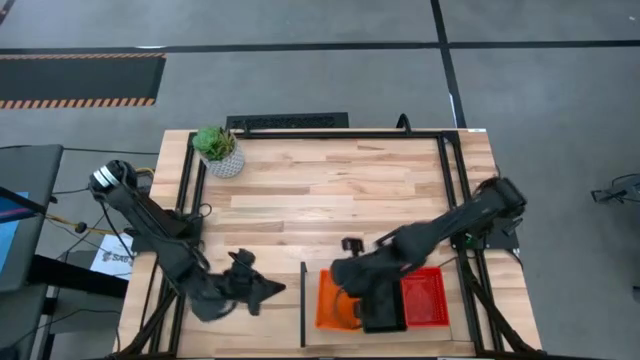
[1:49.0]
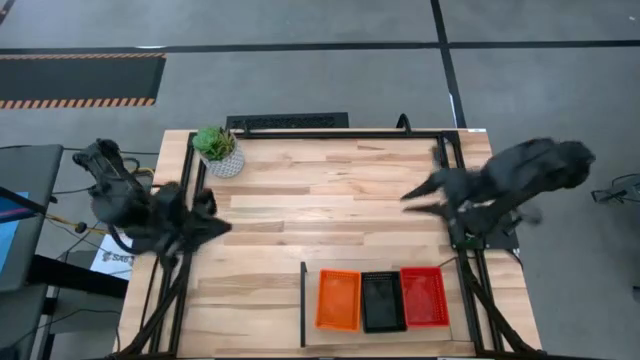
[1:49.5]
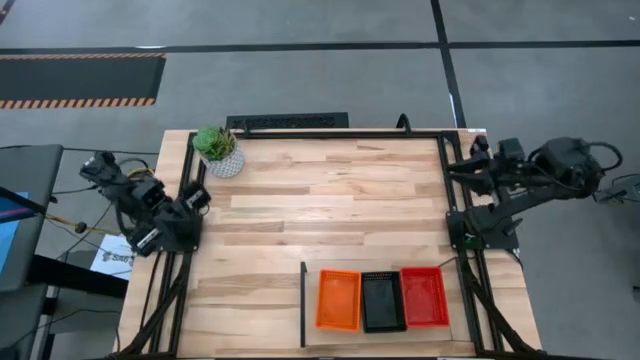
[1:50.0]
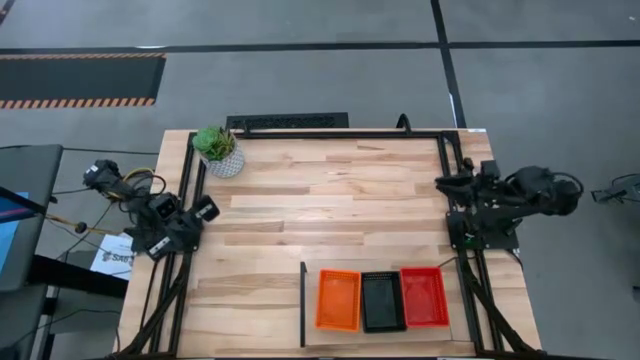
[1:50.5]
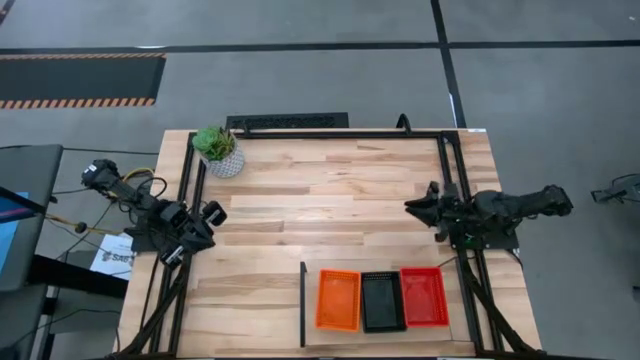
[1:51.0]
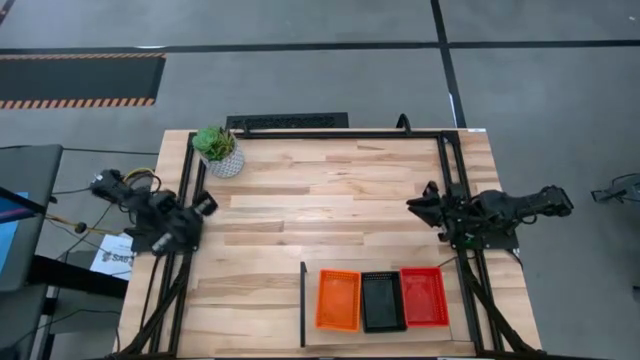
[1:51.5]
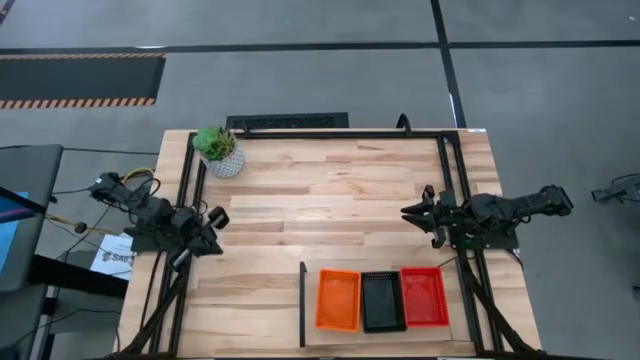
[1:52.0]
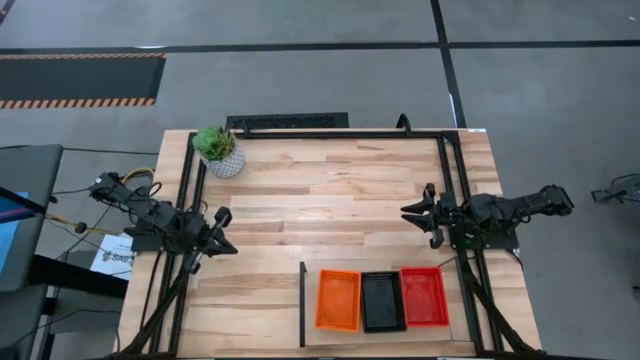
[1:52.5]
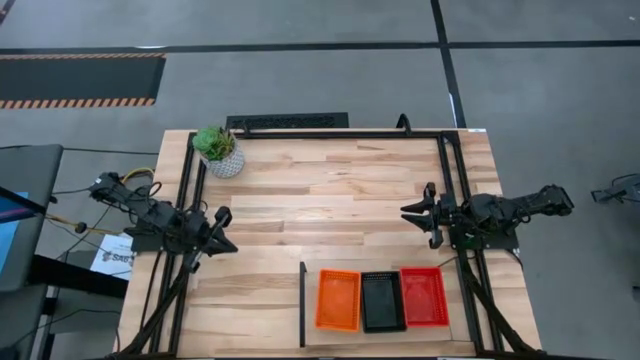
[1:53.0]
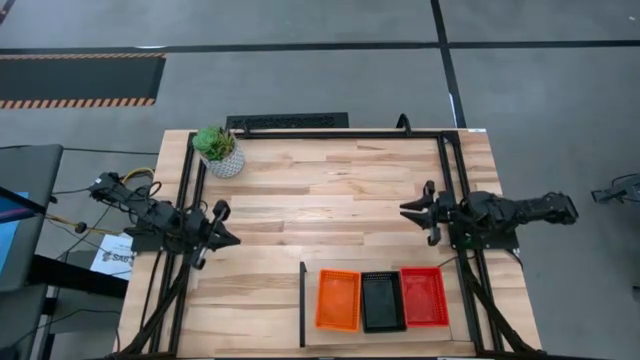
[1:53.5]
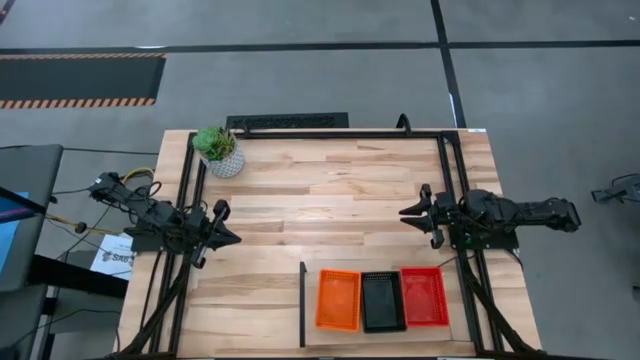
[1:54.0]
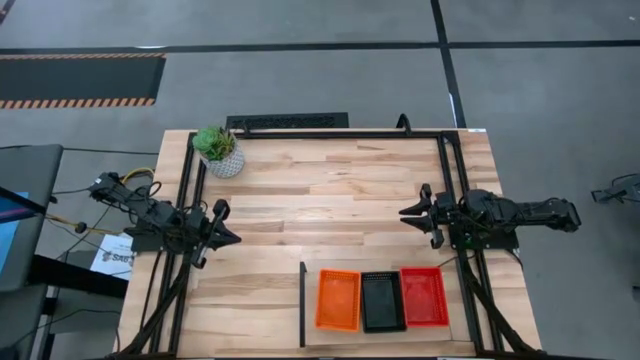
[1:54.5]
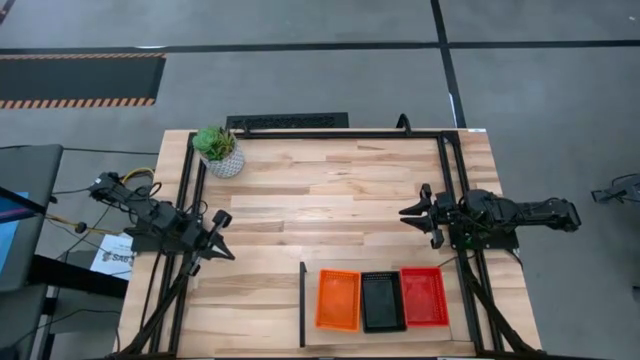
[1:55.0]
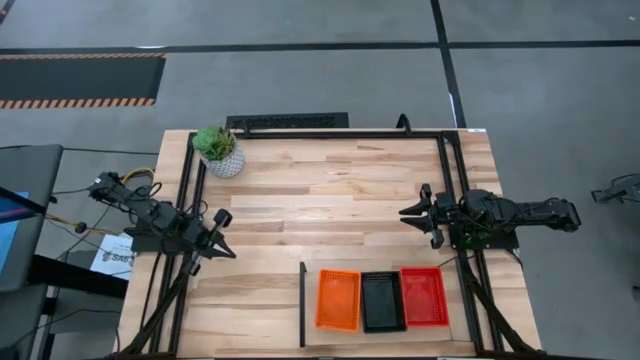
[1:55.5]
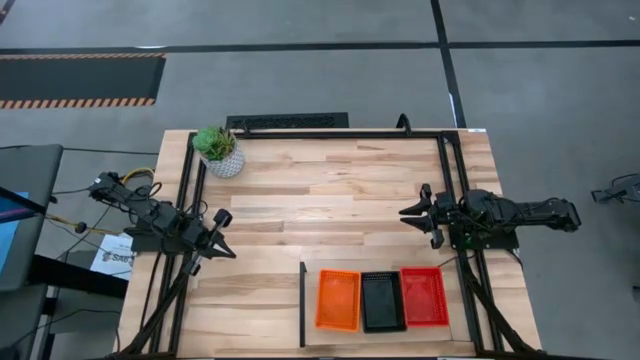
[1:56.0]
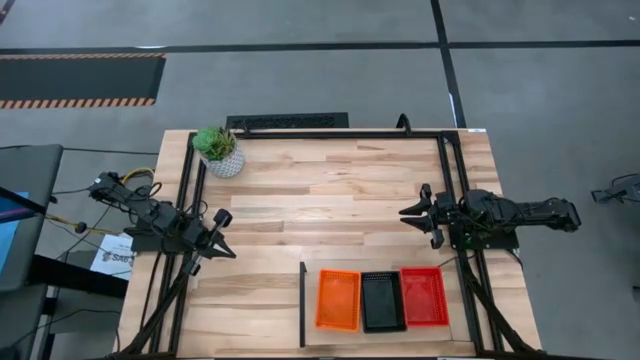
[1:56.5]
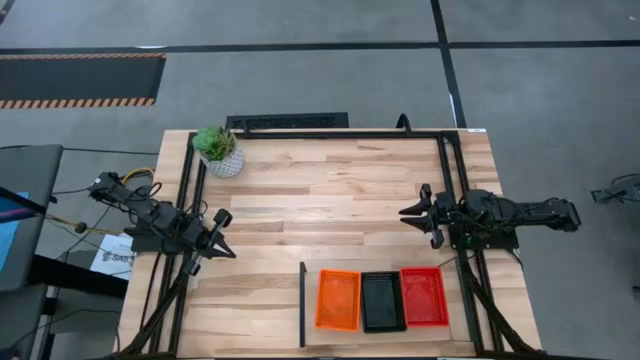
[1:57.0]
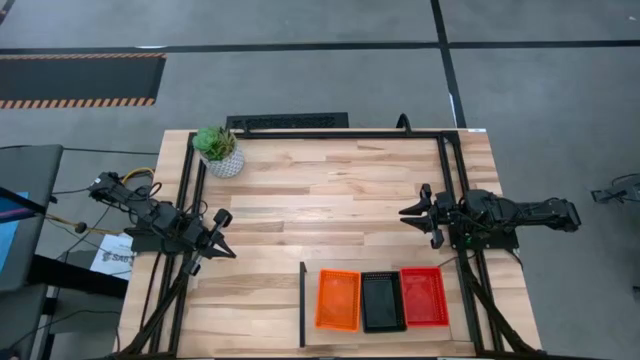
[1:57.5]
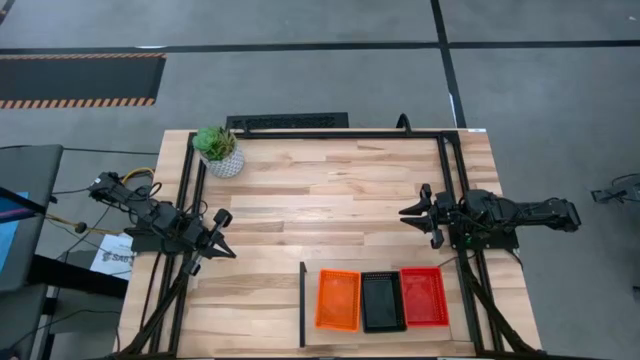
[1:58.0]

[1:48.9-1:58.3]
Task: Stack baskets on shelf by color
Return to Home Position

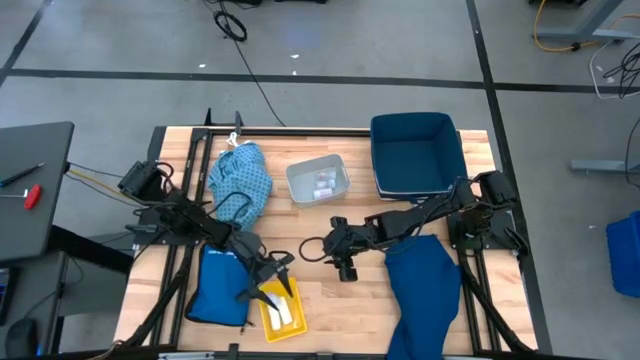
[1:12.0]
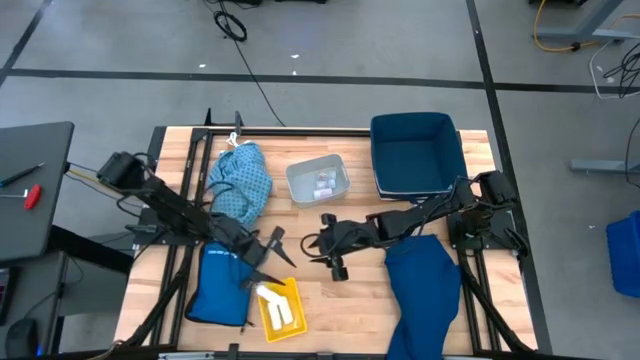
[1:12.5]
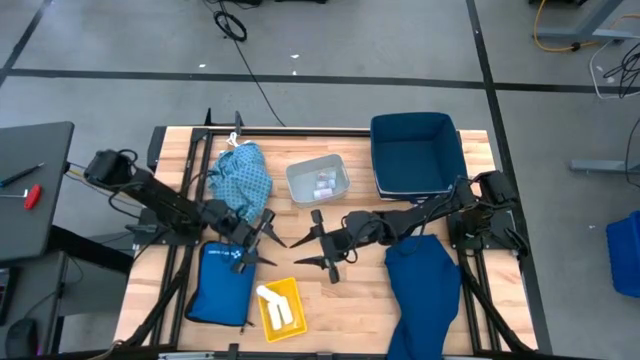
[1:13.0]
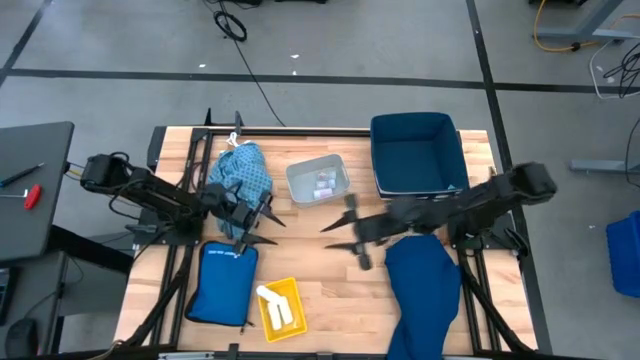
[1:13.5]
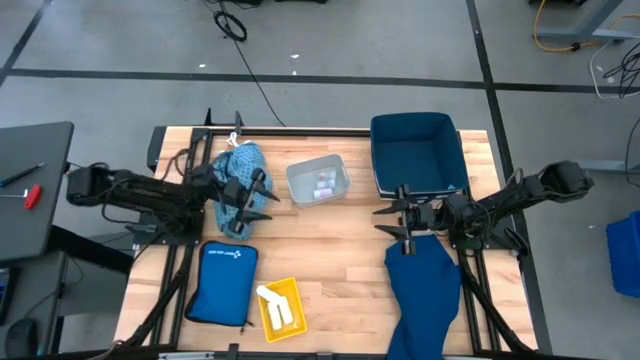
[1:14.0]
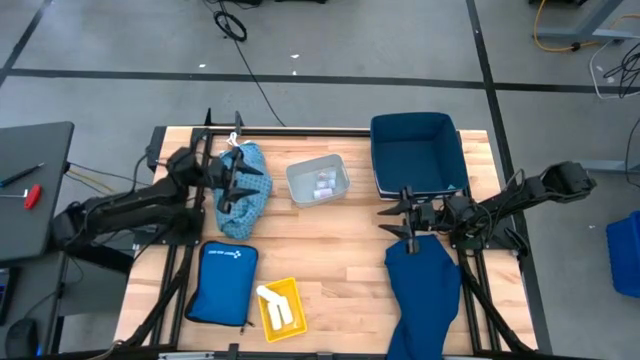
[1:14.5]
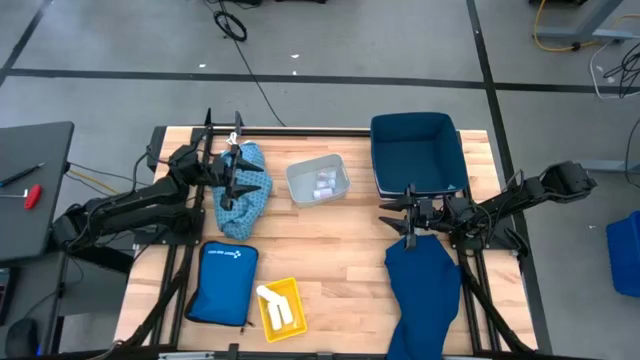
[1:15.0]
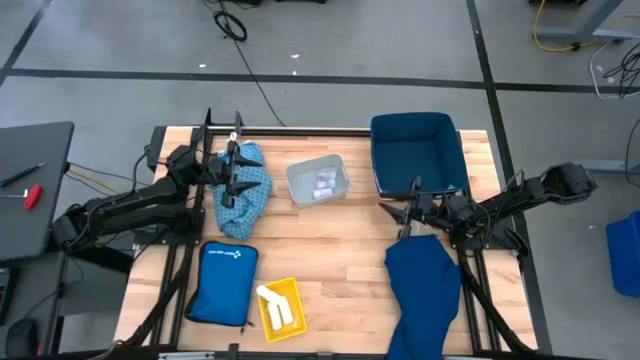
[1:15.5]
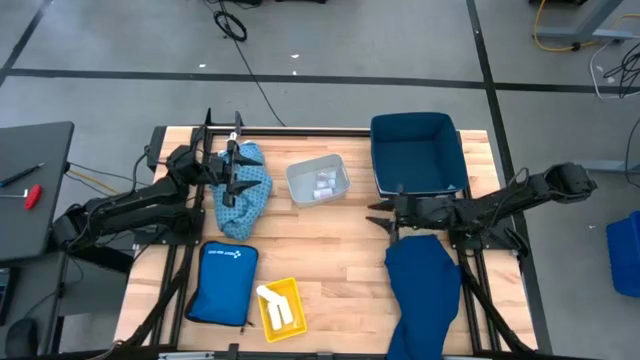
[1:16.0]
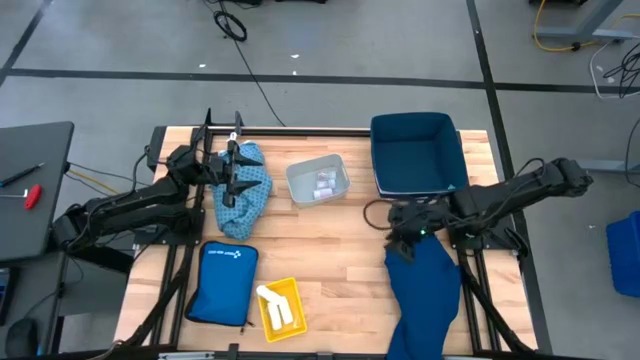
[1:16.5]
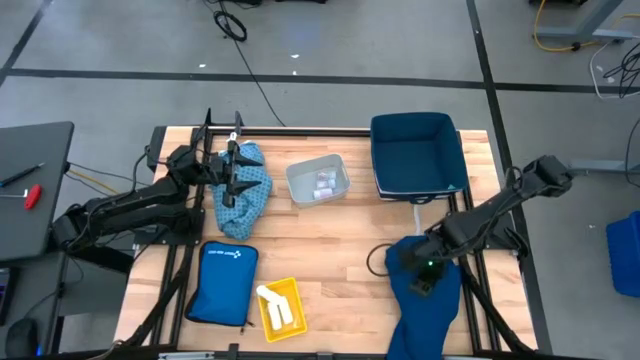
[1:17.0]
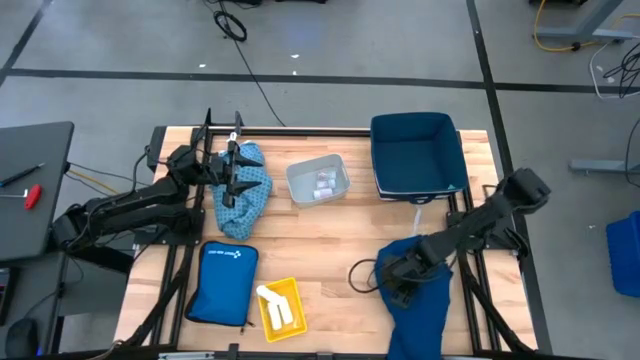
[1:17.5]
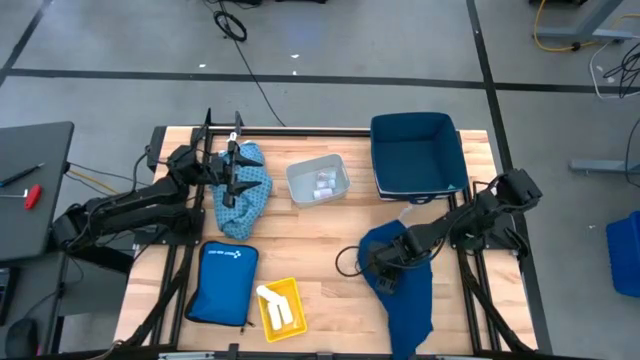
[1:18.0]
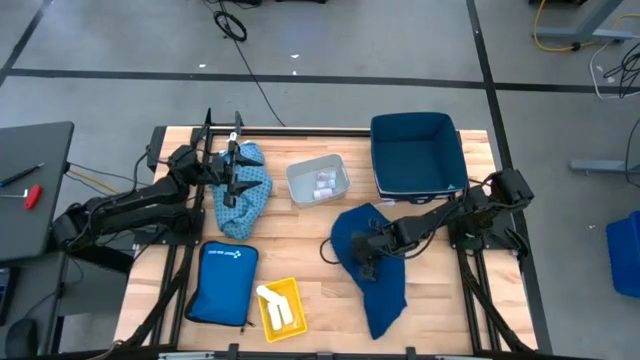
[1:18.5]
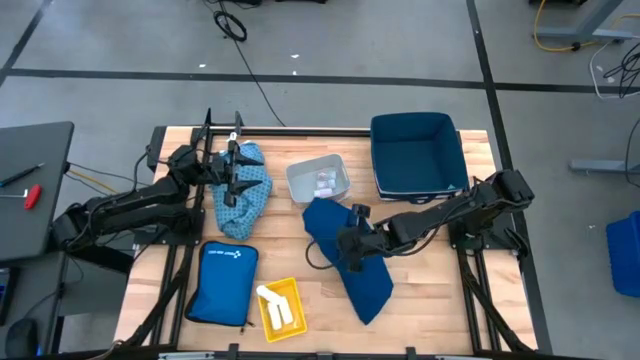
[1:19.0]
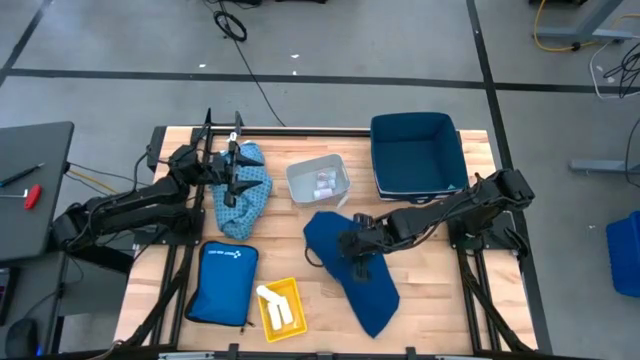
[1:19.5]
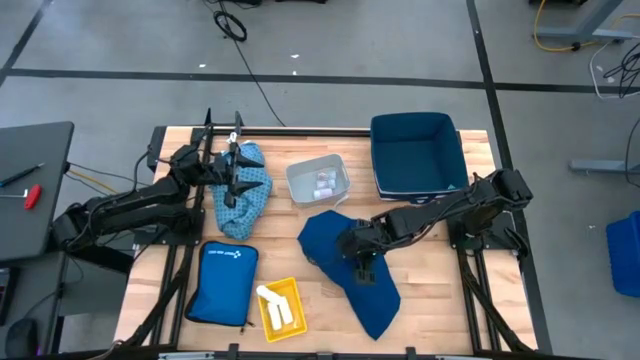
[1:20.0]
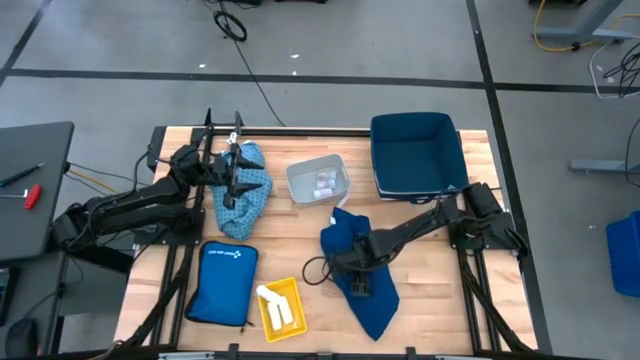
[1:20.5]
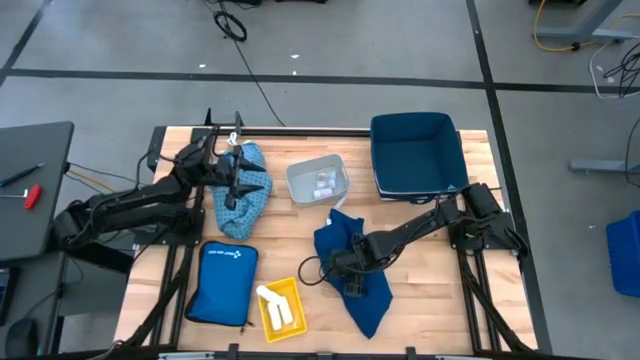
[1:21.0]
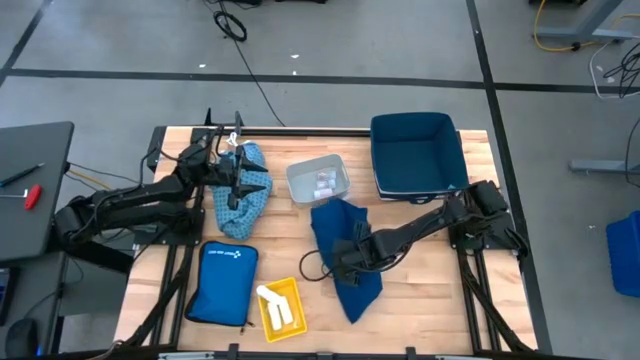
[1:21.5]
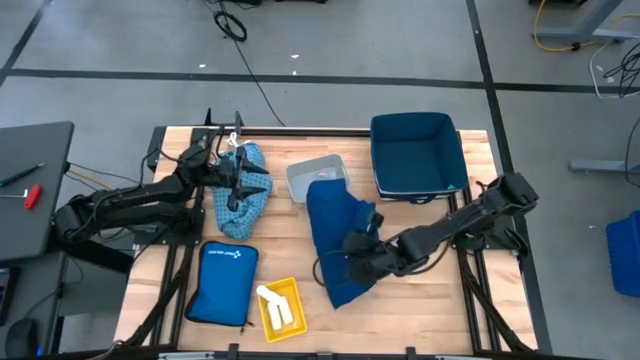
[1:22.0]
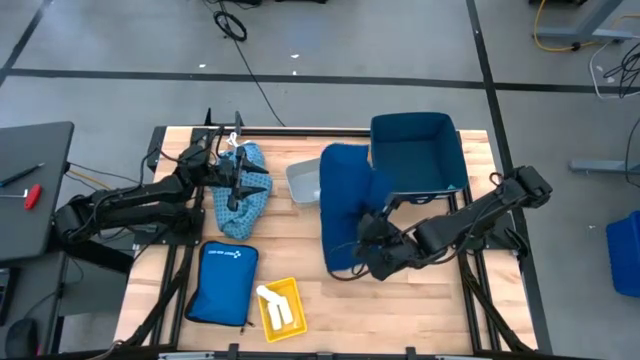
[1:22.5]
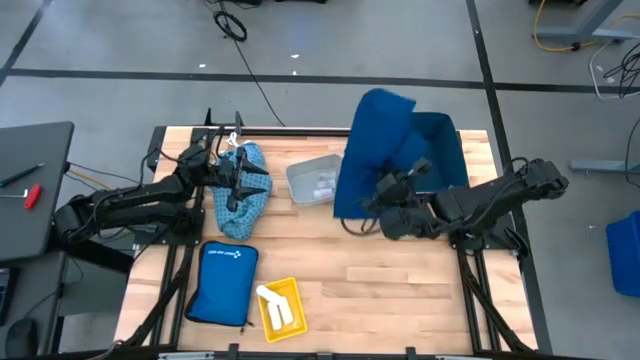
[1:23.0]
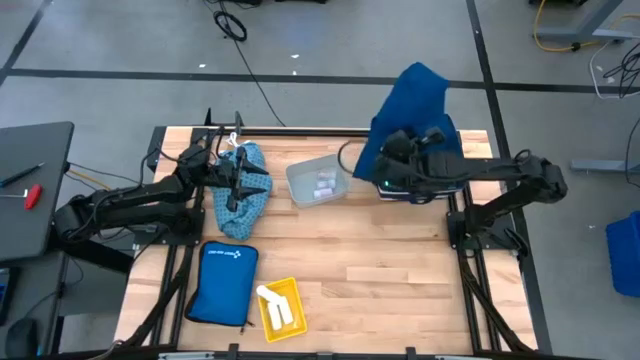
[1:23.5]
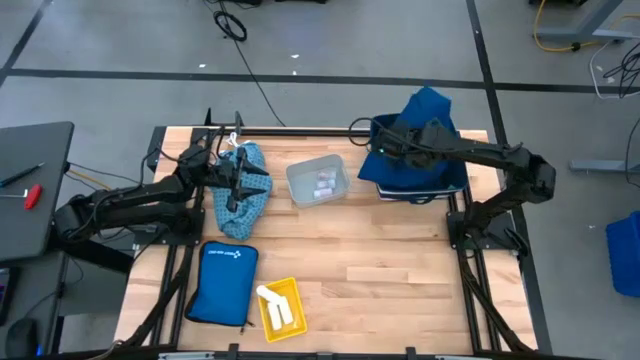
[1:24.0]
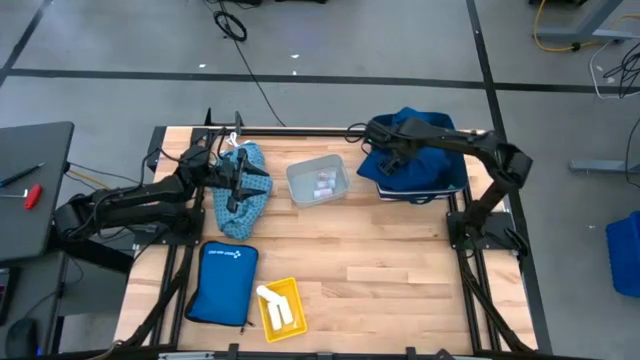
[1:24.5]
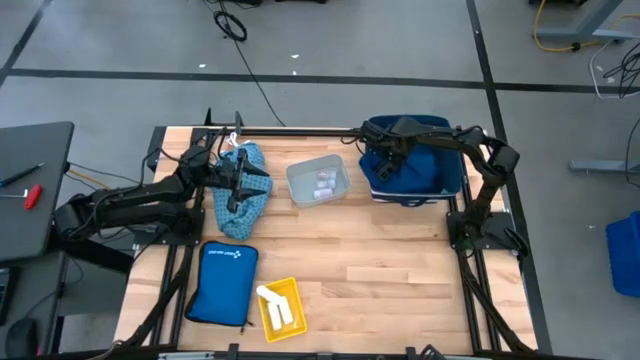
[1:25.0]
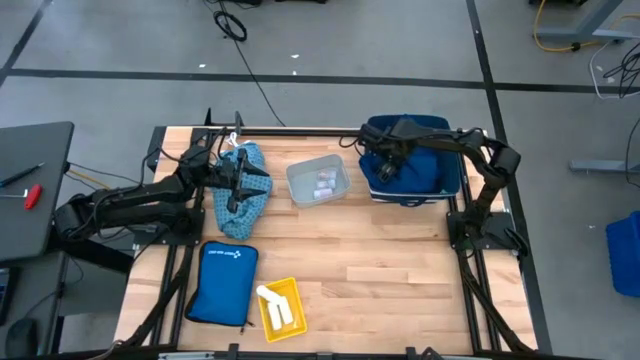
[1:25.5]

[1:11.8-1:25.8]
Task: Pick & place medical supplies in basket/bin
Put the blue patient gown into the blue laundry organizer
